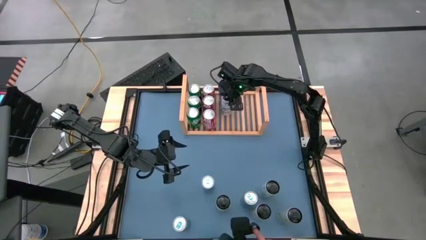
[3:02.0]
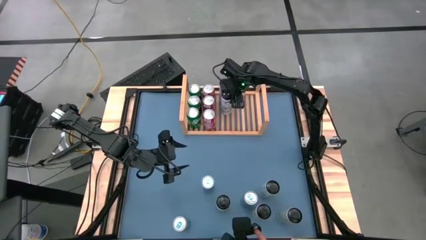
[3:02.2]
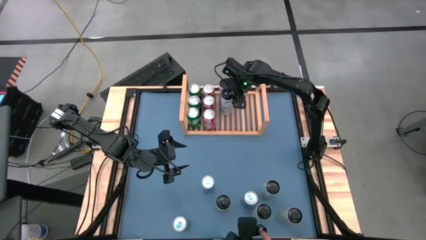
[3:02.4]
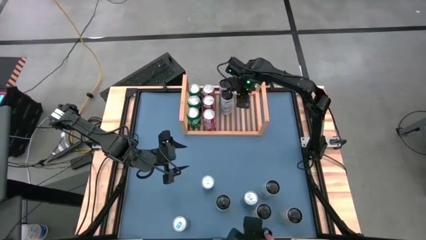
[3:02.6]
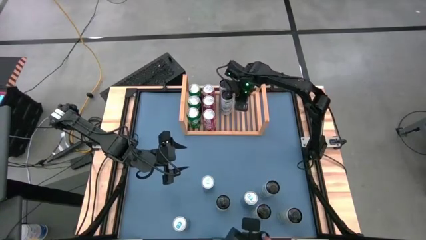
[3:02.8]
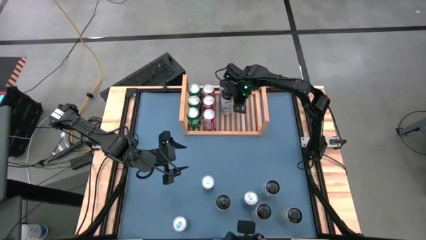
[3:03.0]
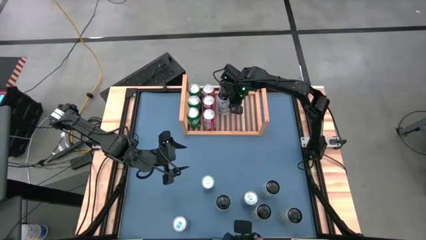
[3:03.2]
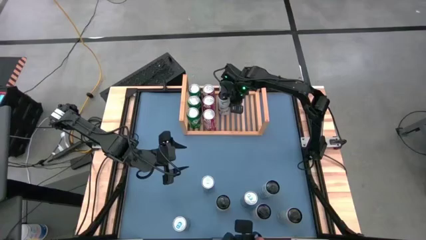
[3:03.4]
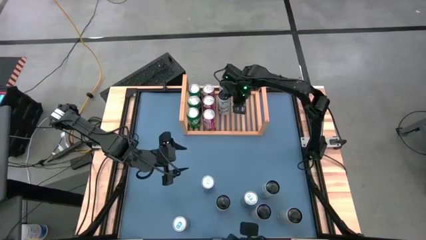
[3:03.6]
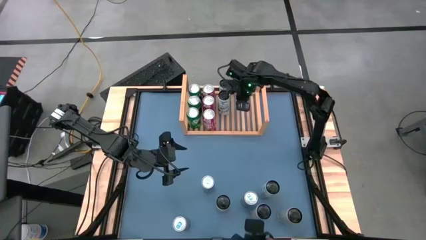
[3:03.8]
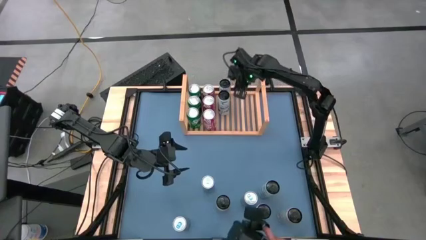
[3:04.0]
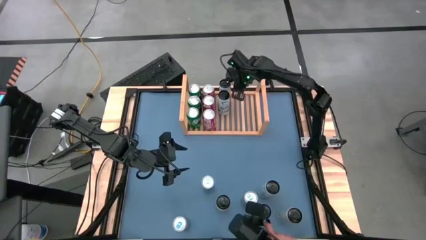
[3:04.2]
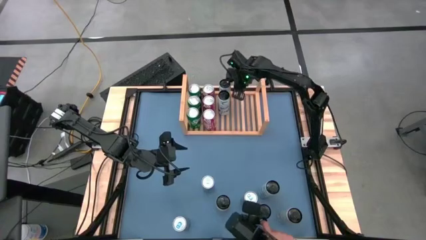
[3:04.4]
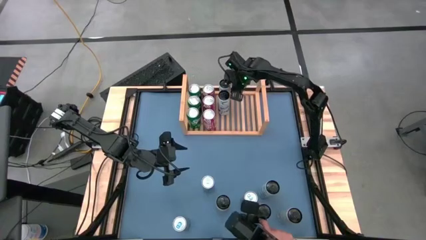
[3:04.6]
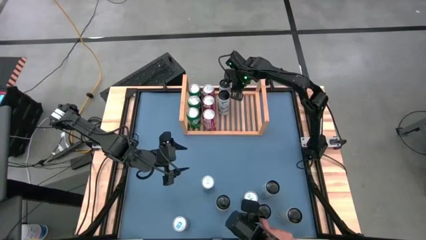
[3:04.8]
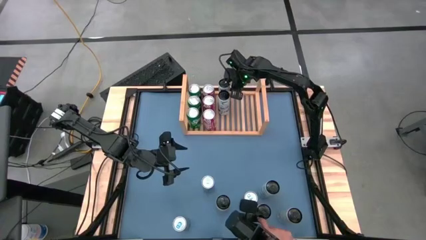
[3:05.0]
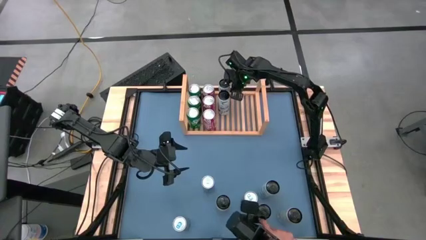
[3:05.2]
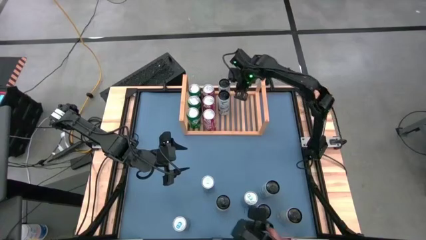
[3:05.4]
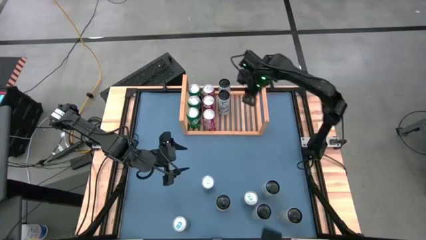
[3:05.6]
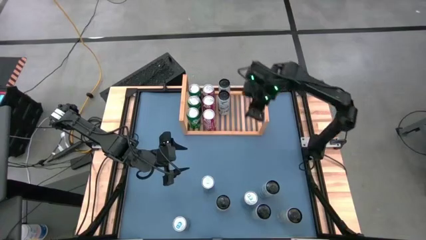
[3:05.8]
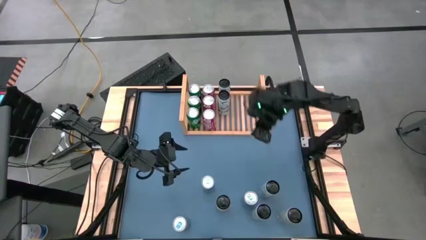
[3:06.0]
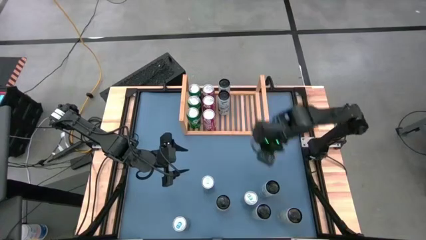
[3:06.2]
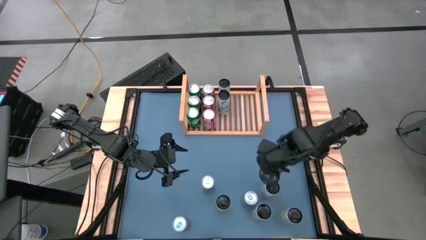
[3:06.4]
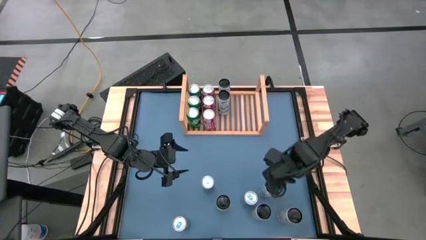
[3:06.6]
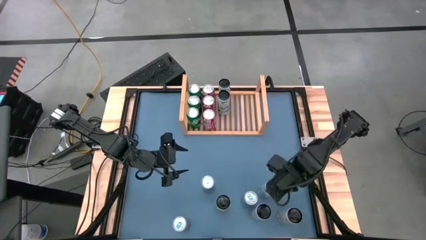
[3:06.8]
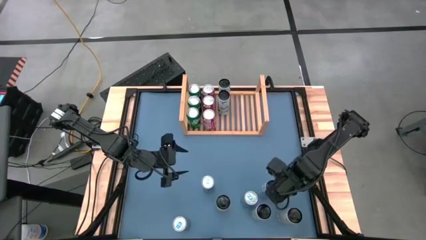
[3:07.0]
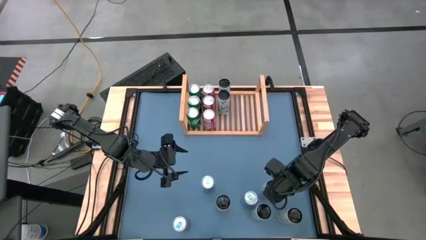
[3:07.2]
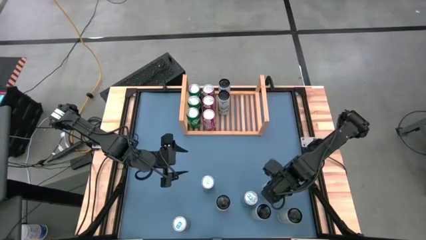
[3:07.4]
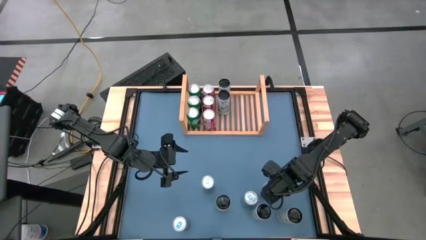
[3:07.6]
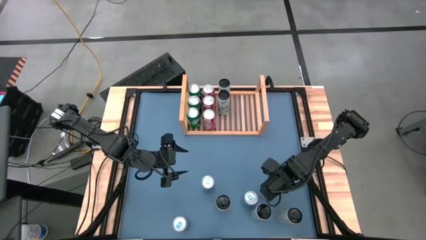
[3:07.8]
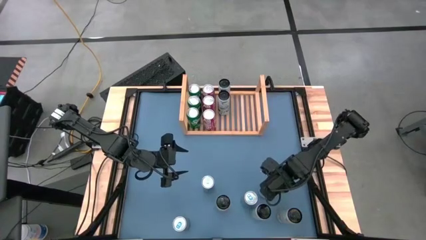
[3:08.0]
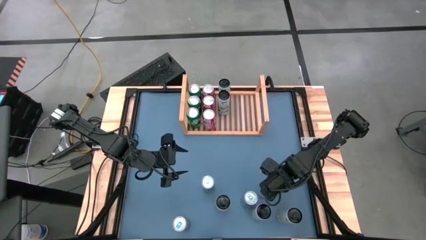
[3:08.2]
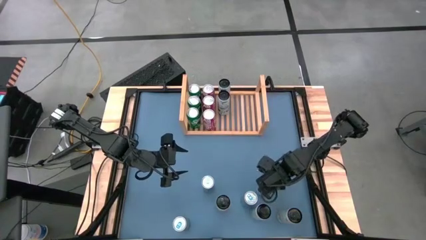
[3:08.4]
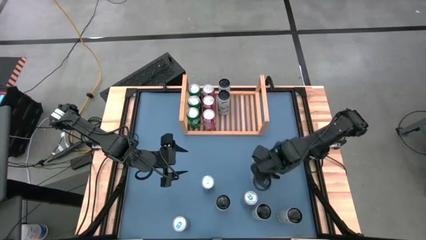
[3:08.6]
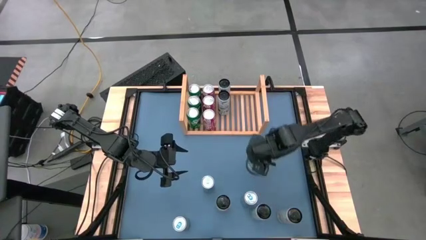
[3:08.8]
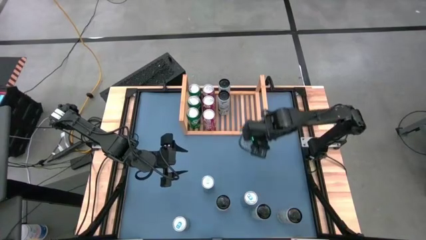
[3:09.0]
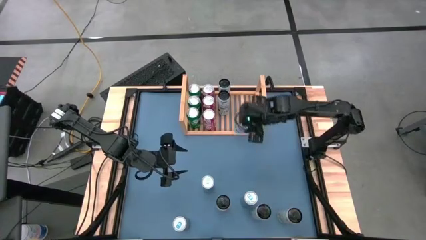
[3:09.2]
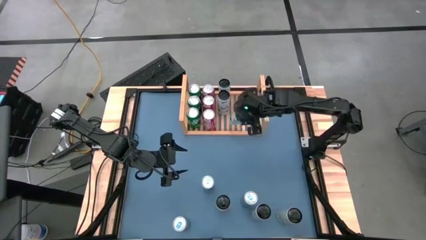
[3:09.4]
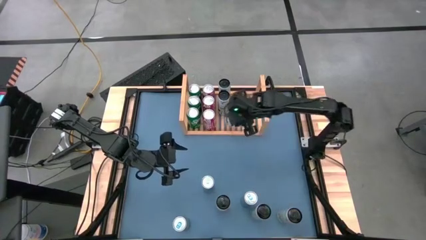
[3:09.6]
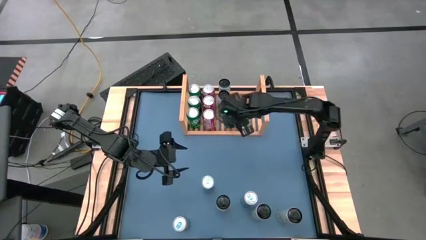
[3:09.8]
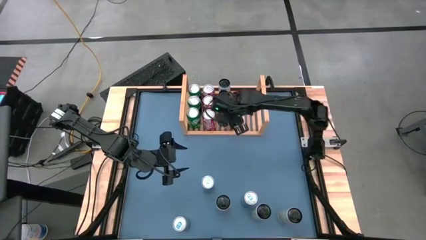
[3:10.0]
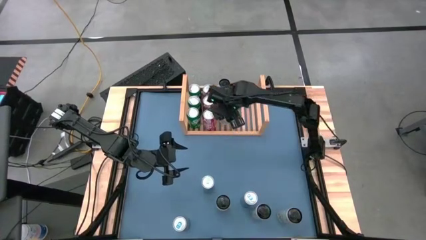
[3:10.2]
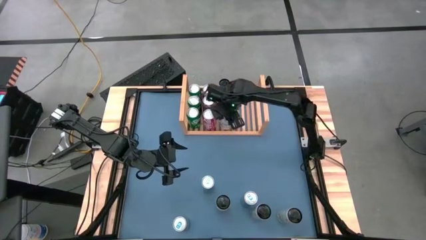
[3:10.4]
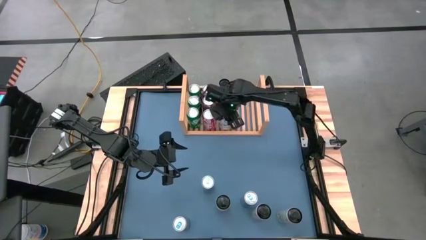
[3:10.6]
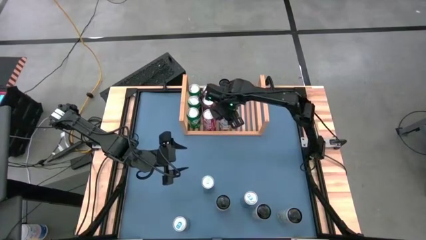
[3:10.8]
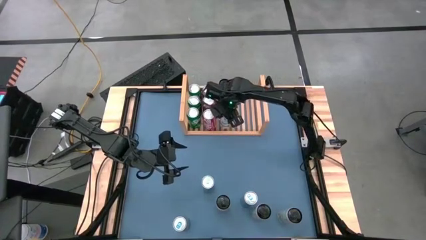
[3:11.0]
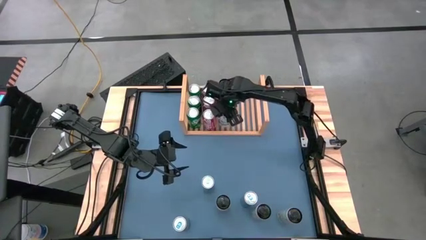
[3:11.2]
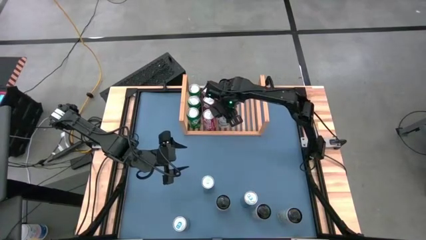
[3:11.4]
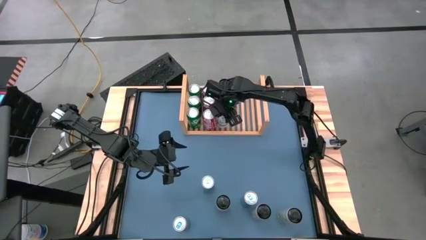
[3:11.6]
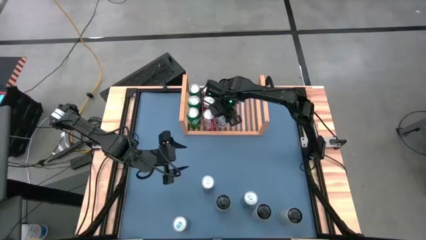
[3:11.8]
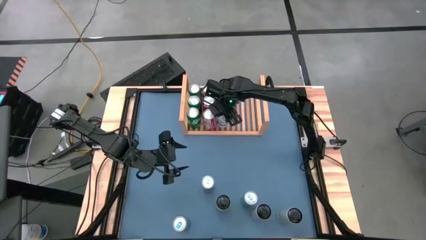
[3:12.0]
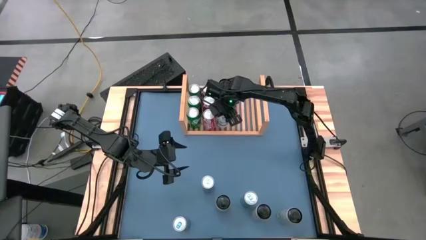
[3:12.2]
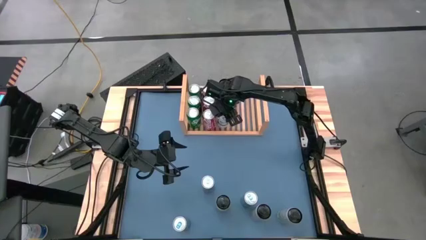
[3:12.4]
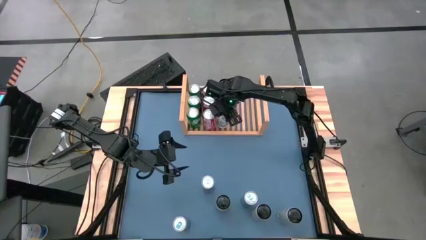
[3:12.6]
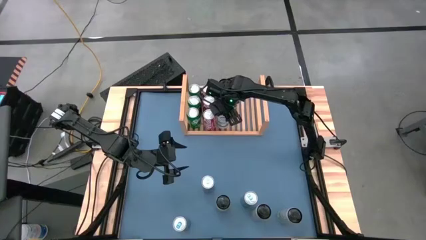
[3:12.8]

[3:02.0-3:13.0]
Task: Place canned beverage on shelf
Put the bottom right white and blue can aligned with the white and blue soda on the shelf

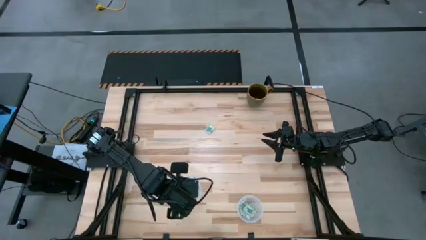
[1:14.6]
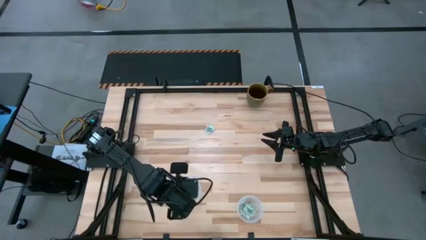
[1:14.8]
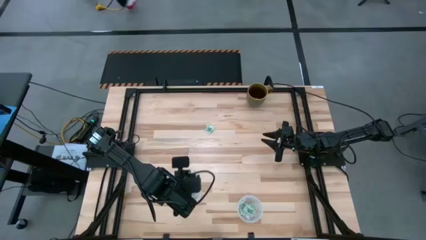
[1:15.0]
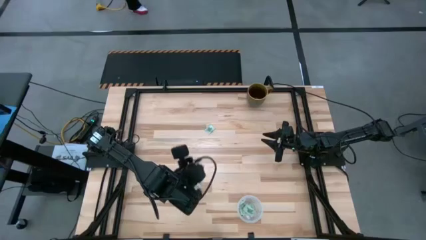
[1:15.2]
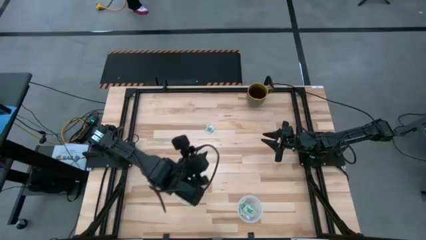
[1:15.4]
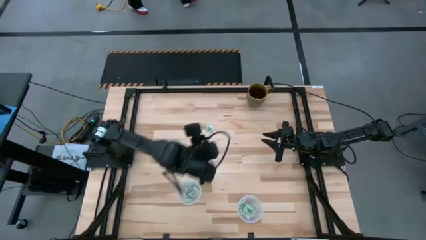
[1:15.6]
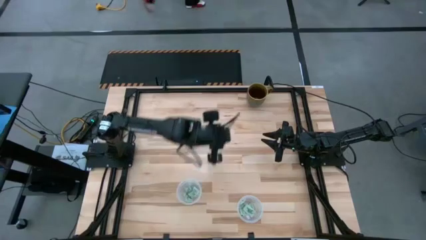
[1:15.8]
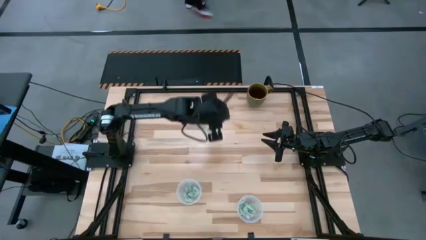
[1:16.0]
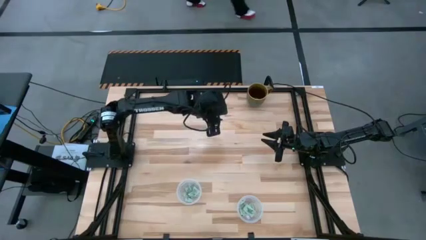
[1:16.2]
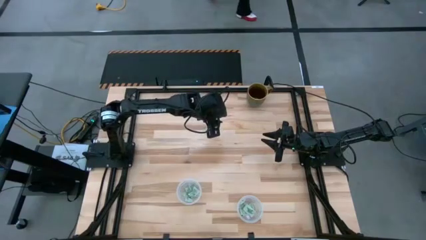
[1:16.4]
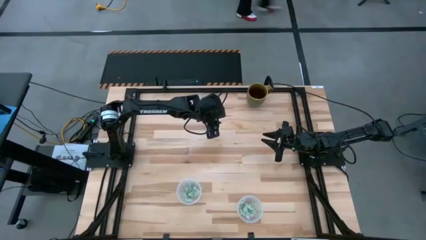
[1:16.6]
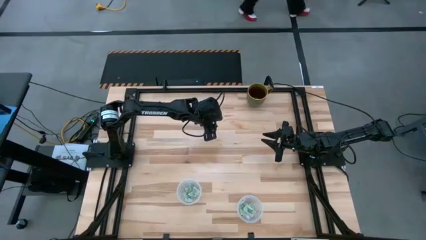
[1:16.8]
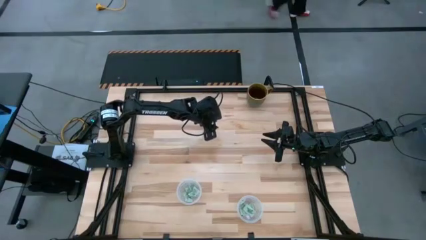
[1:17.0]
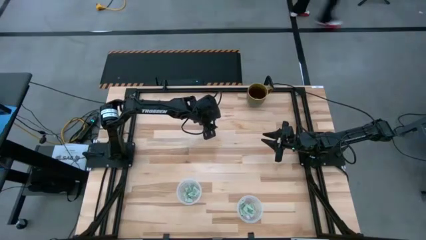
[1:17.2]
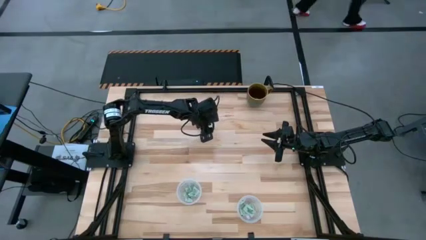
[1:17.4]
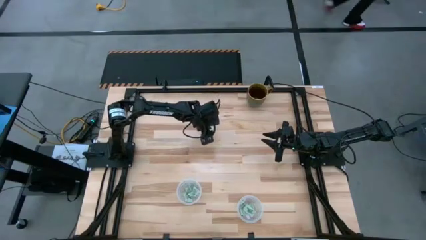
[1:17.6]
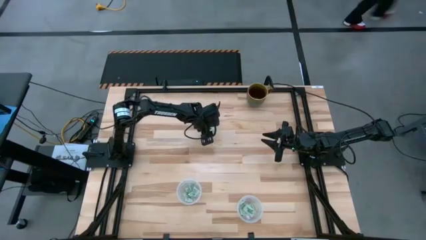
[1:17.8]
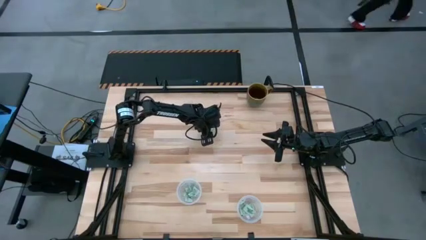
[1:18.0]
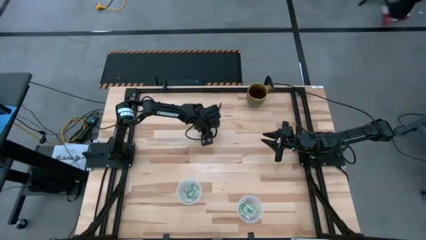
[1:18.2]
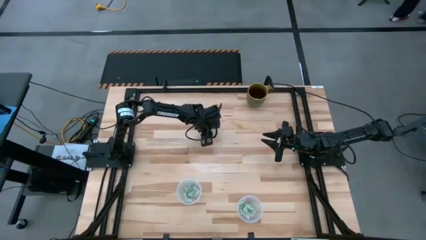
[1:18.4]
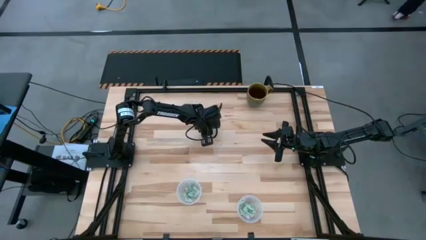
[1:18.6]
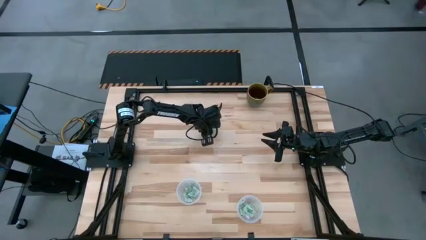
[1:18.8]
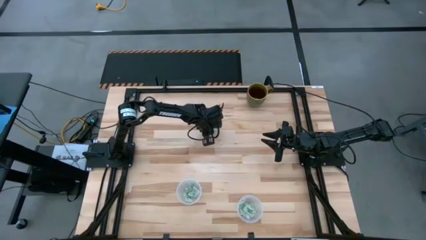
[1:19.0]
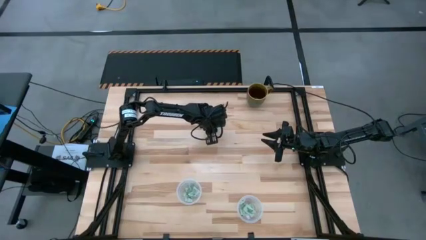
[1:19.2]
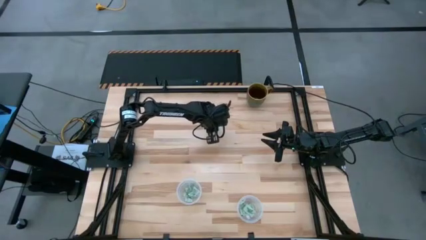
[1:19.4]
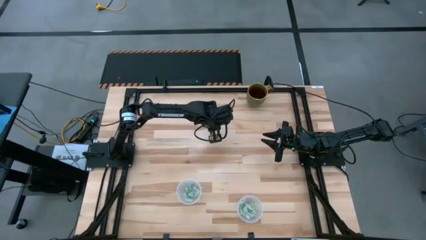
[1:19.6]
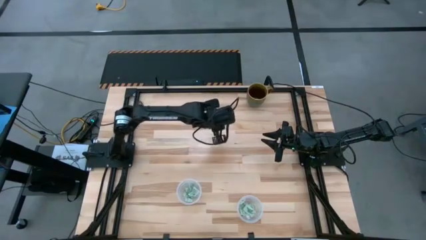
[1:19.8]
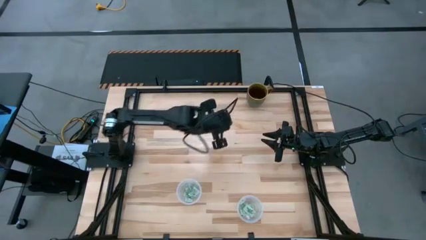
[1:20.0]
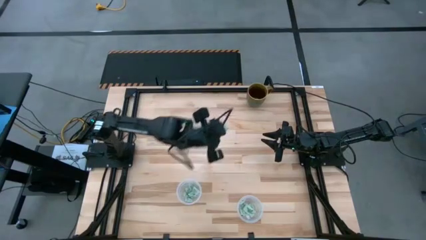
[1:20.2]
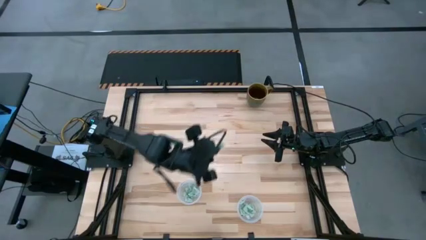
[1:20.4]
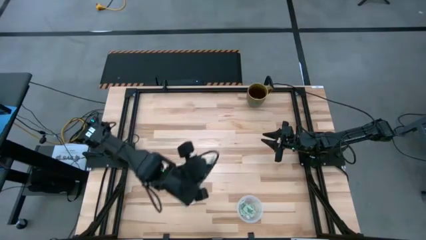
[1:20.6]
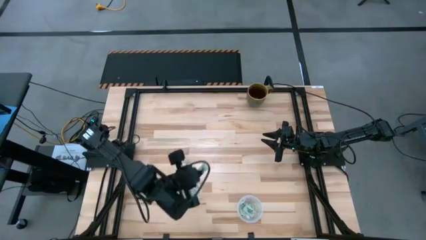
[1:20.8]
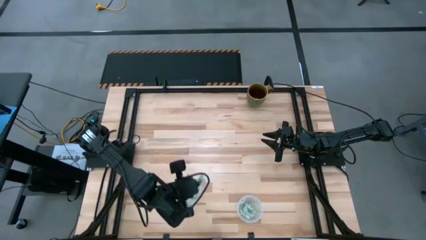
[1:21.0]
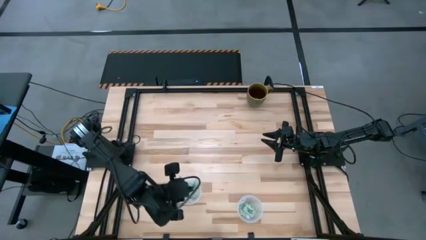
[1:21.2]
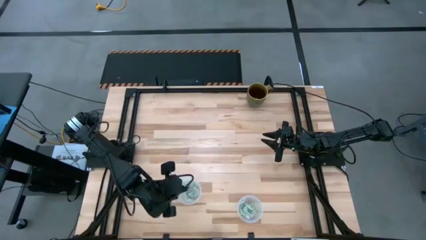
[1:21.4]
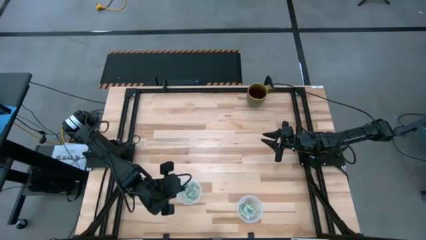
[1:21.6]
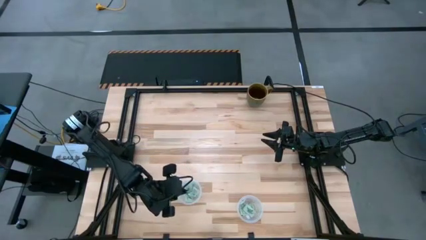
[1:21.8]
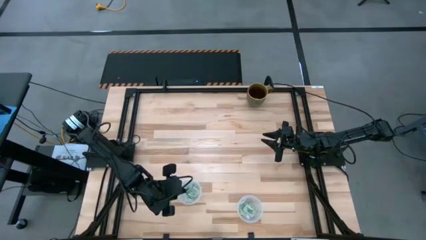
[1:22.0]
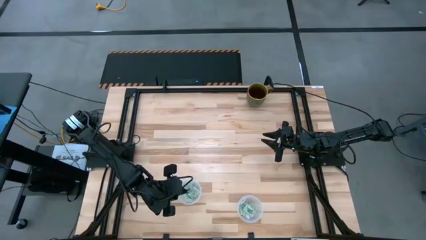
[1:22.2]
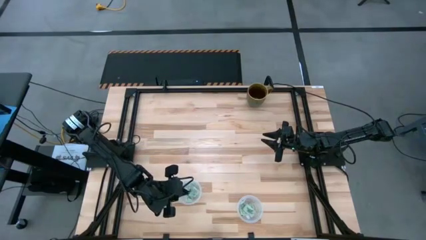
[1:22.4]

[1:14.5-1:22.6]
Task: Pick and place items into bin
Put the stevia packet into the left transparent bin
